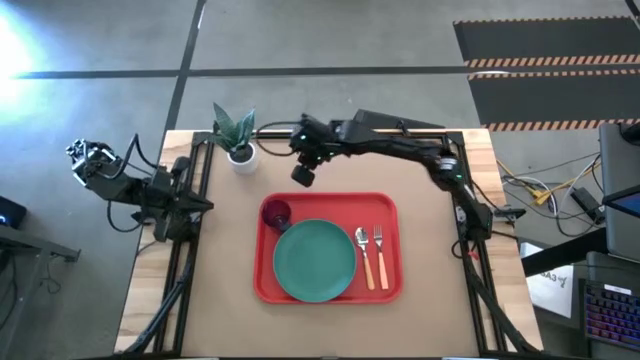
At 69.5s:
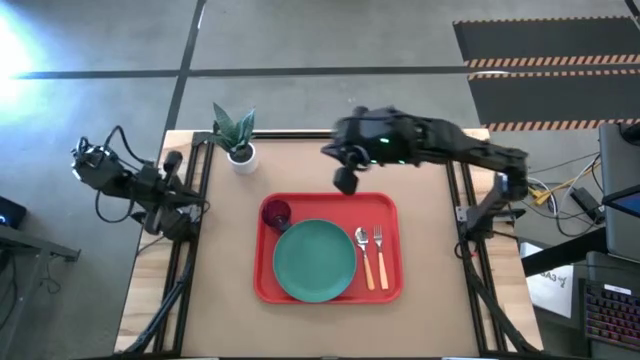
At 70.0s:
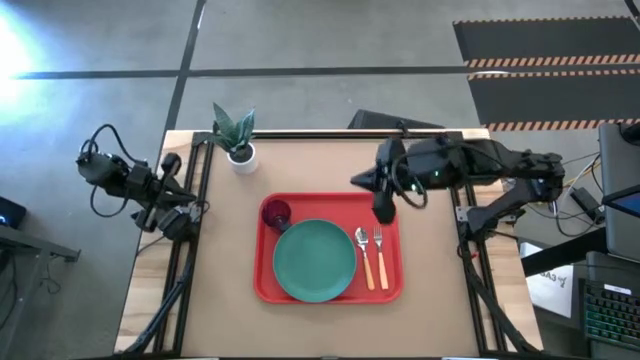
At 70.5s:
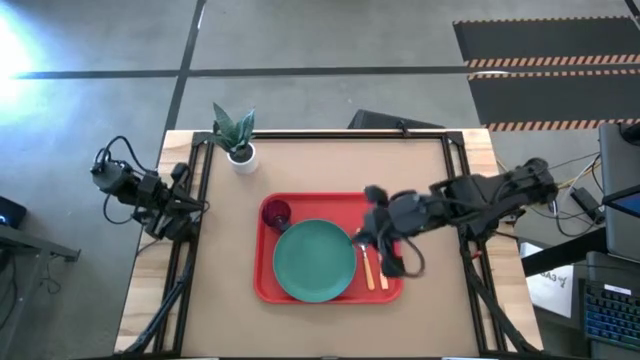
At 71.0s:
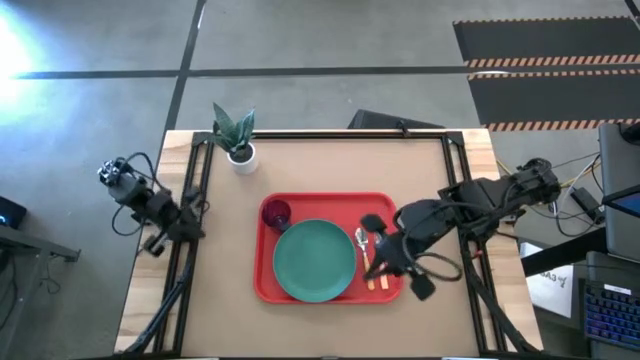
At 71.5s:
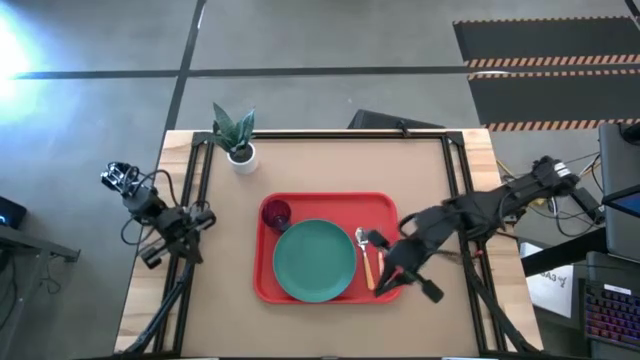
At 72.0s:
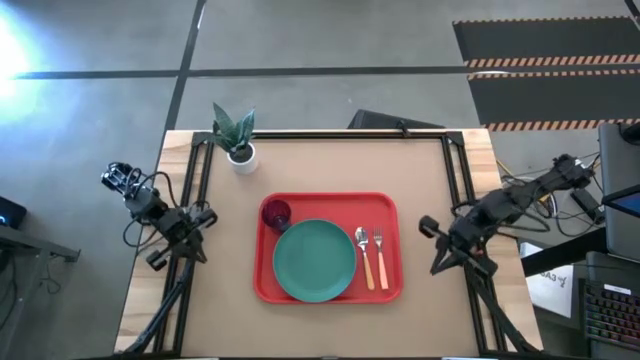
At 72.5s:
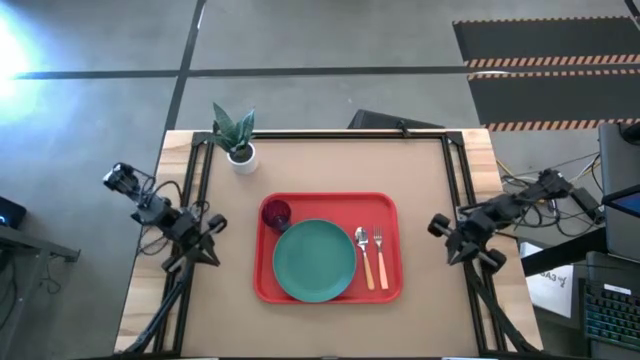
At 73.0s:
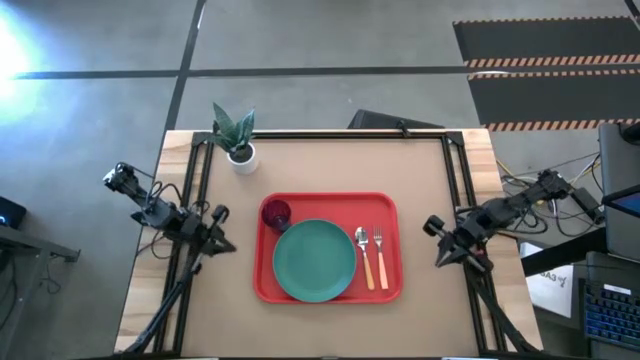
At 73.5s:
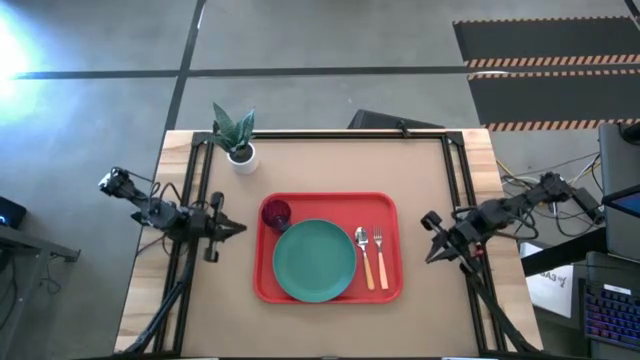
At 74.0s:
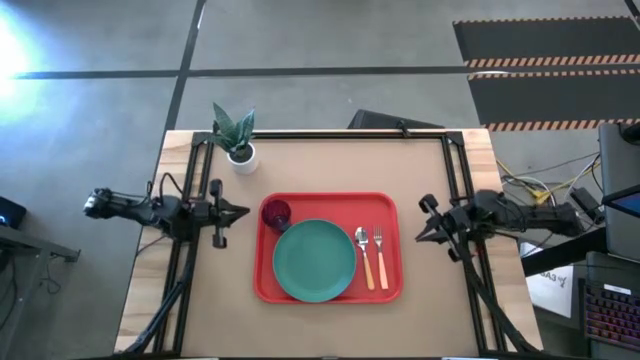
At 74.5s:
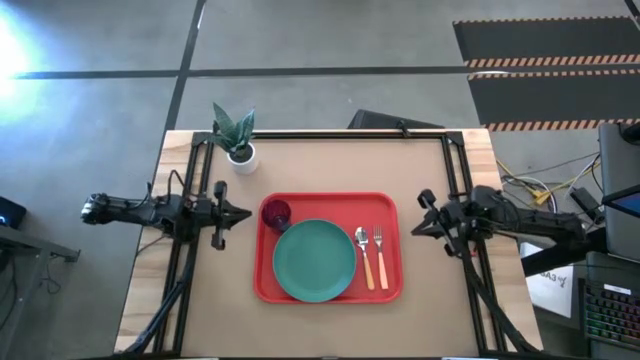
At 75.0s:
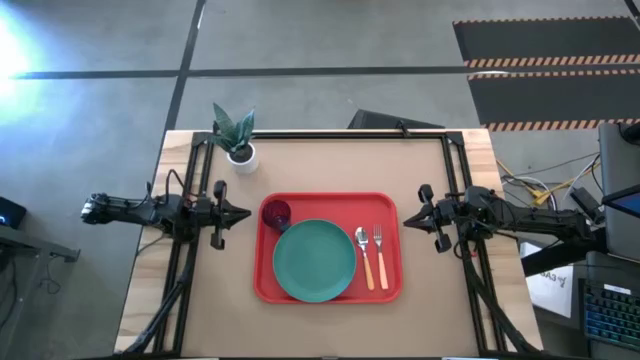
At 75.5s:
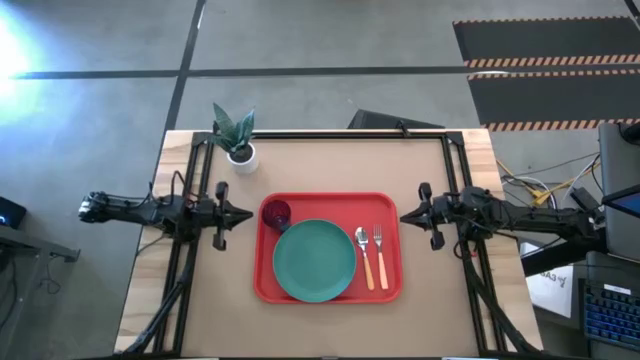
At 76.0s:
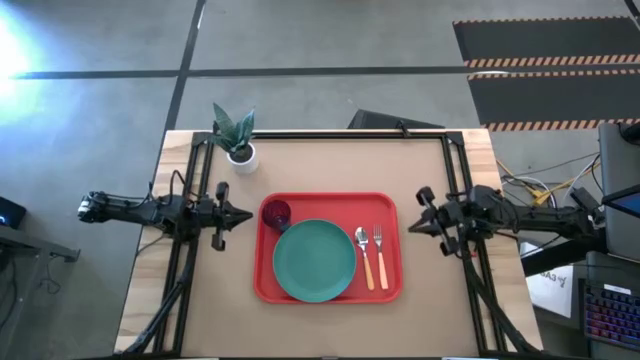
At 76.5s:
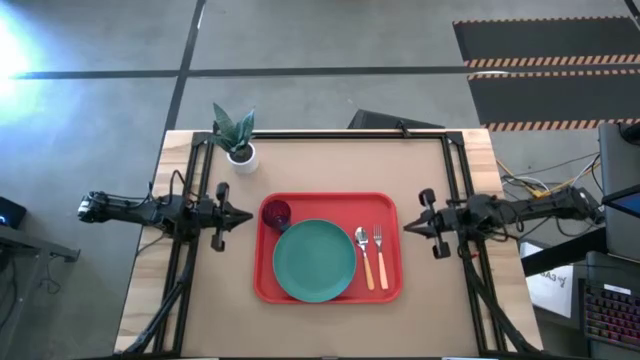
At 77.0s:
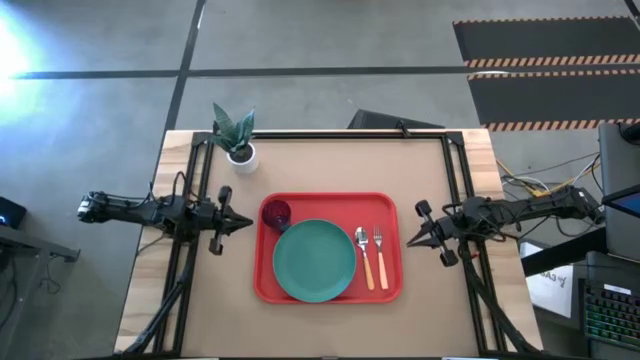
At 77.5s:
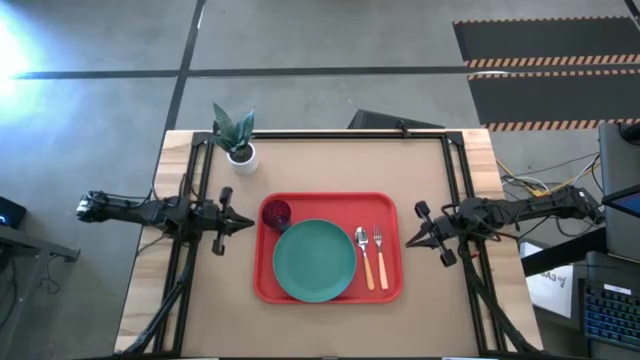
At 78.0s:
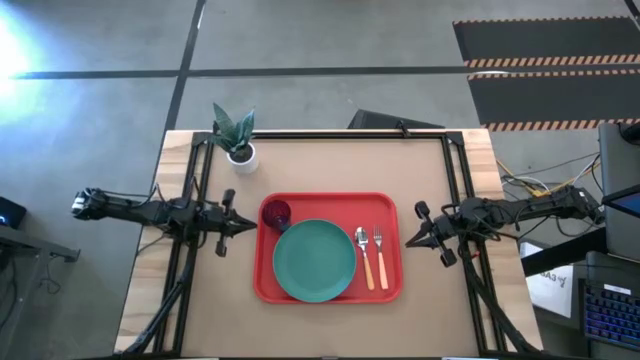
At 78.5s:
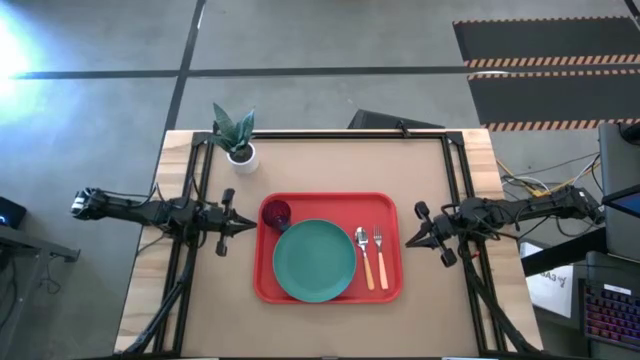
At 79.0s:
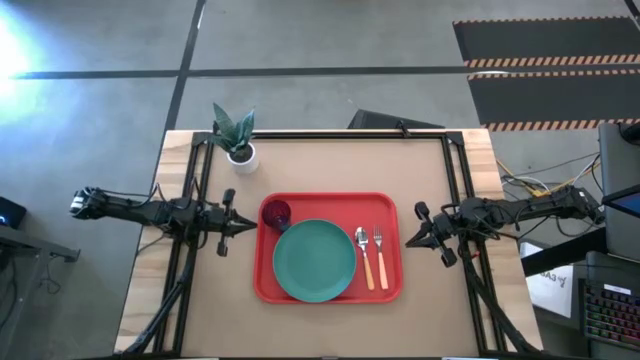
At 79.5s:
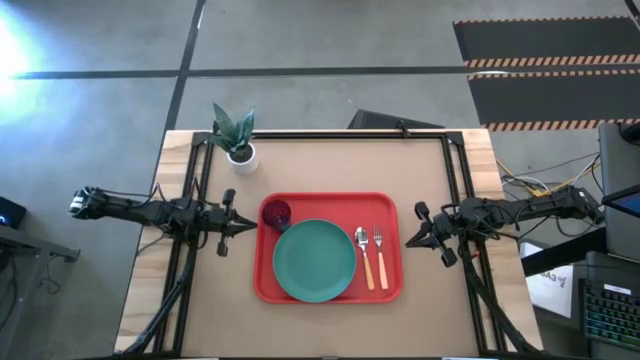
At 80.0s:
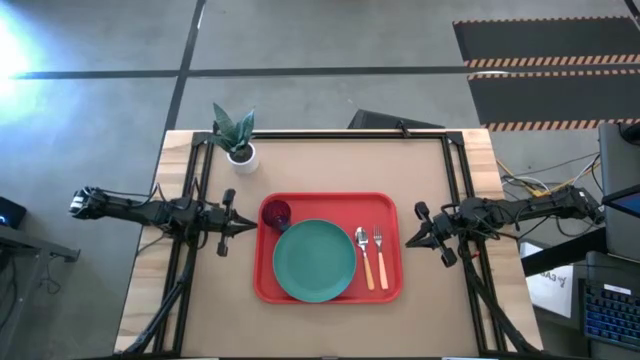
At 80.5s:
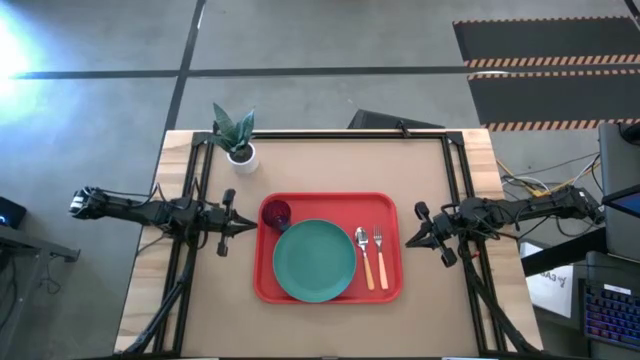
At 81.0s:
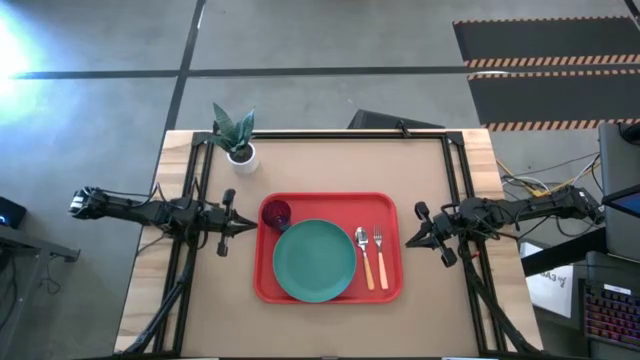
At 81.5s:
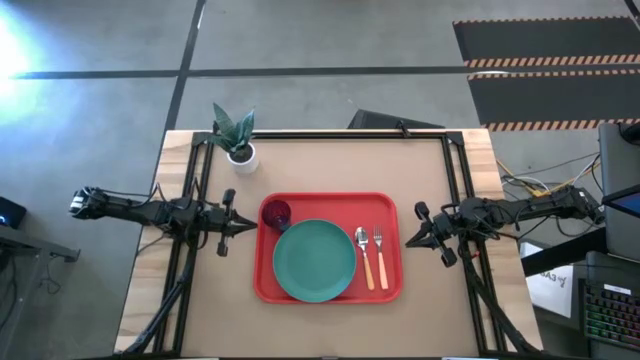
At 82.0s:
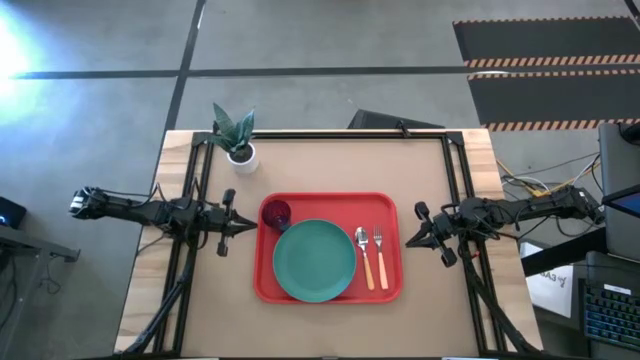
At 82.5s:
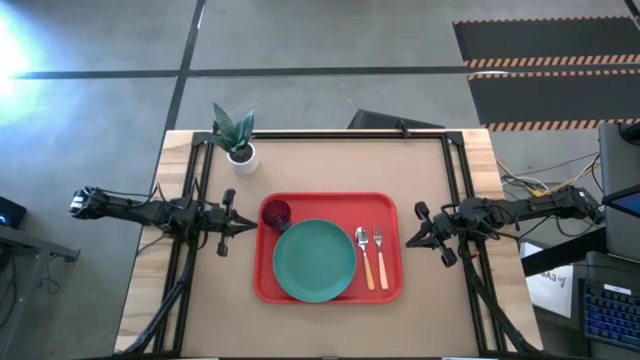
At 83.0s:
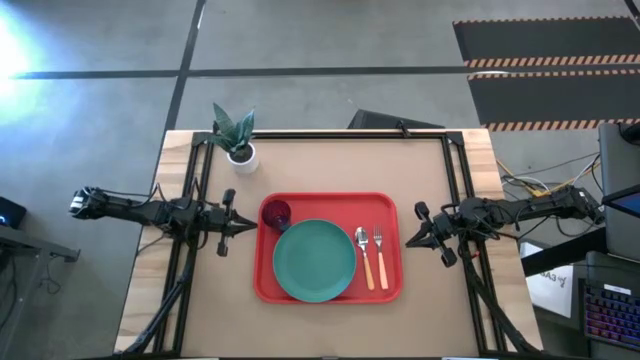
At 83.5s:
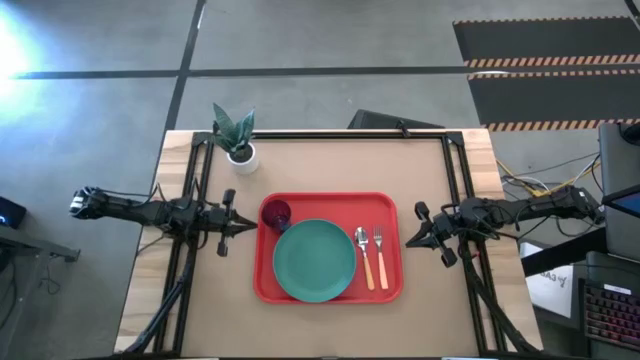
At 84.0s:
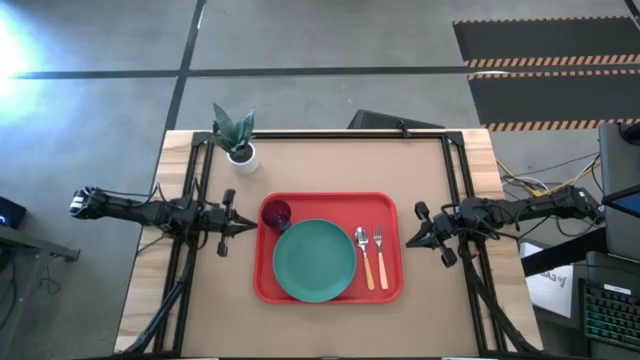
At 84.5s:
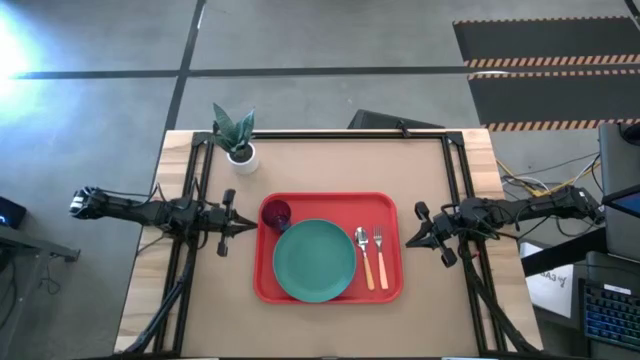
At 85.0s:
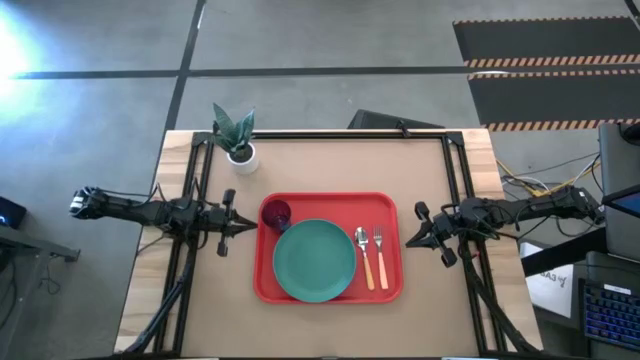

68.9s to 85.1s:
Task: Pick and place plate/cup/fork/spoon on tray
Return to Home Position

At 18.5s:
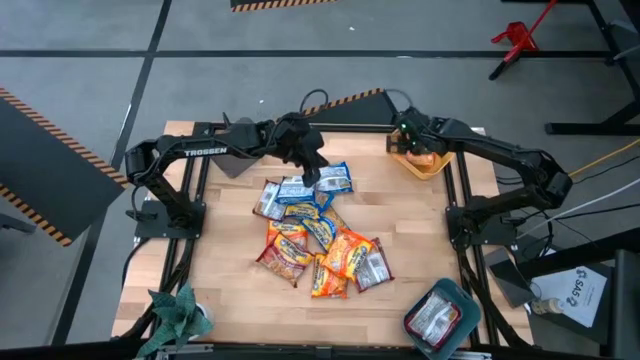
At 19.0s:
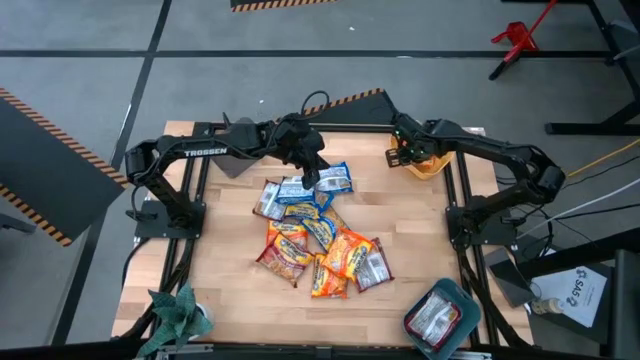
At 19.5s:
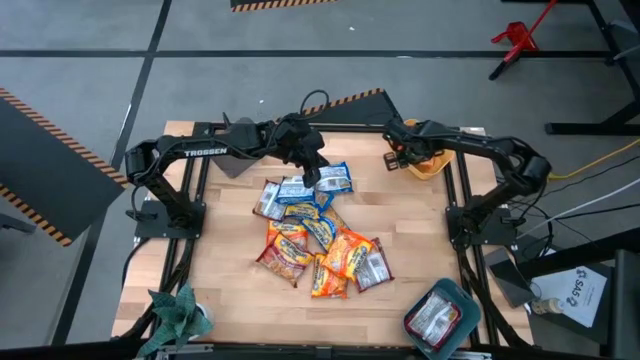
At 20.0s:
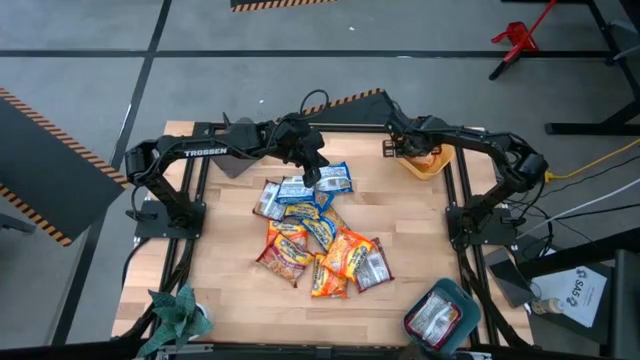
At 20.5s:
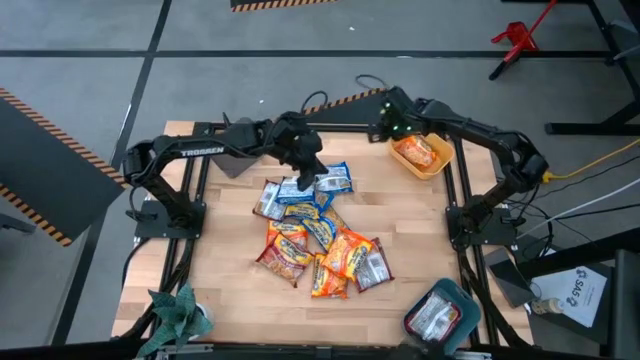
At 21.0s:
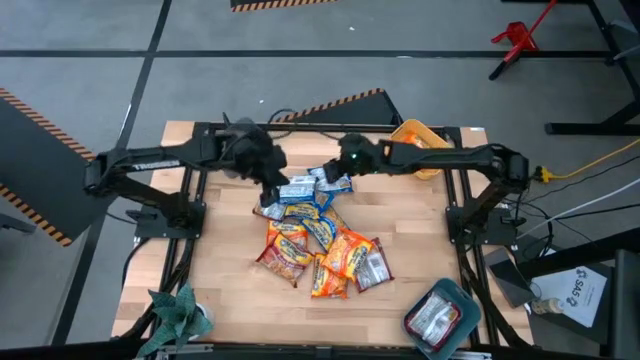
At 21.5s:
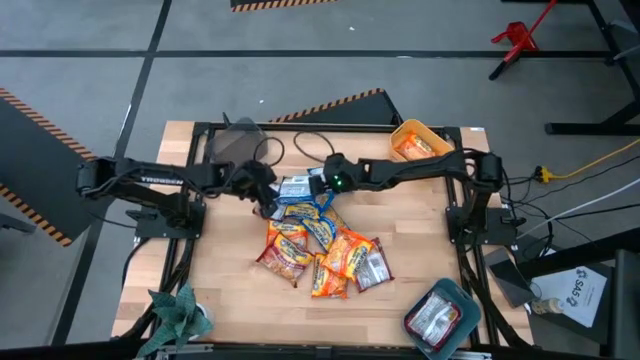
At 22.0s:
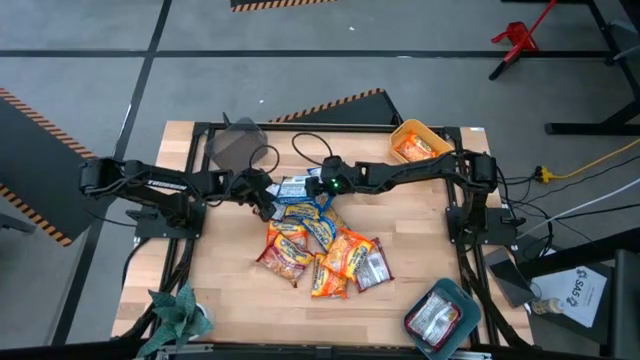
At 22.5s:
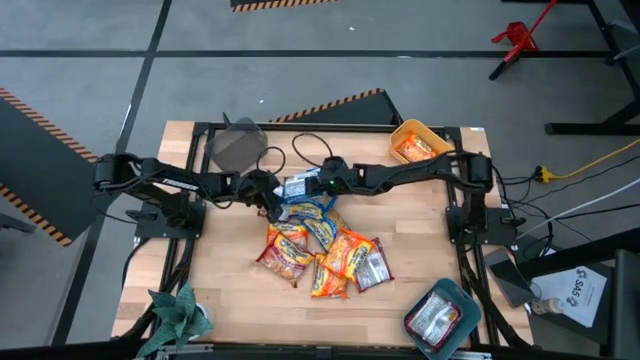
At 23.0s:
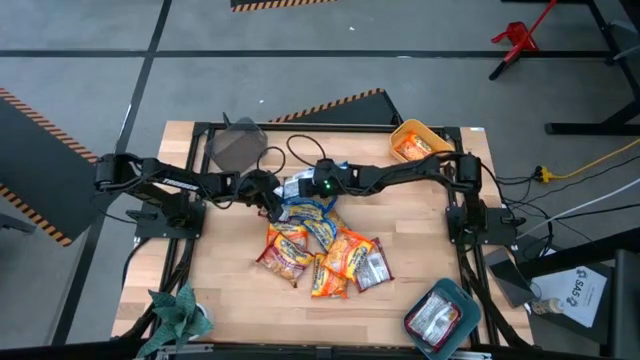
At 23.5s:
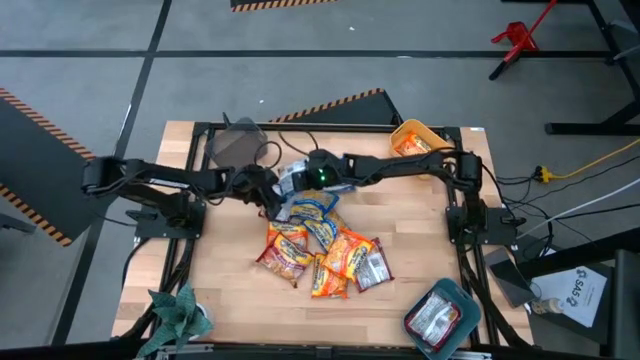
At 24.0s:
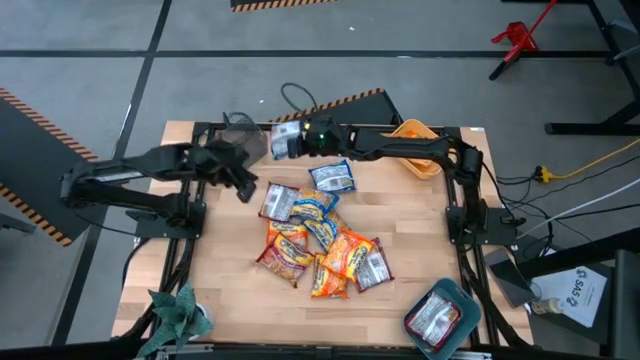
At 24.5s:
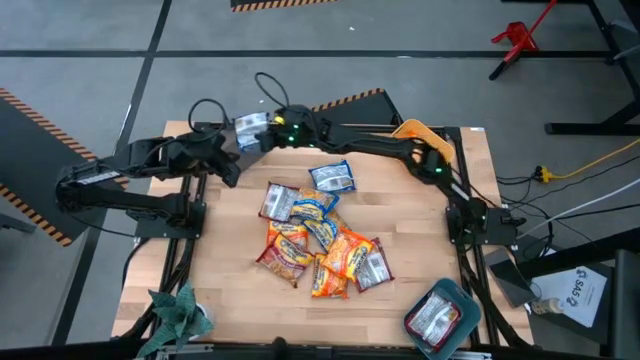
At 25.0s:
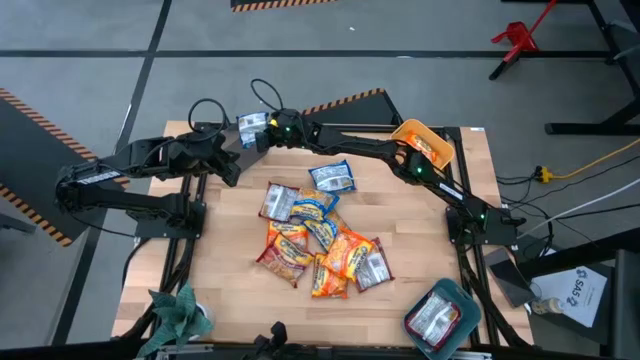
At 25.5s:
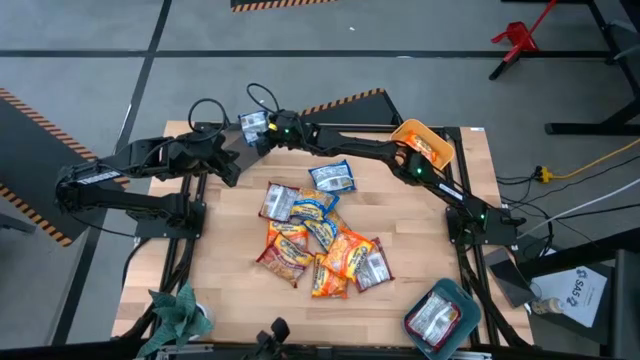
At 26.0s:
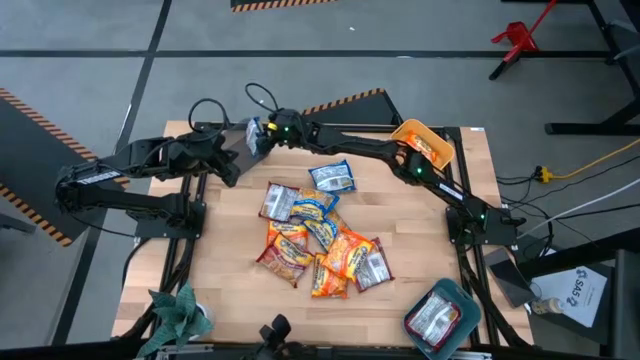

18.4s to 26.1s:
Task: Sort Maruchan noodles
Put the blue noodle pack into the black bin
